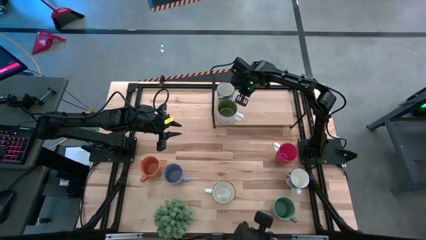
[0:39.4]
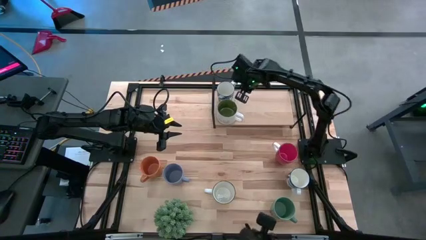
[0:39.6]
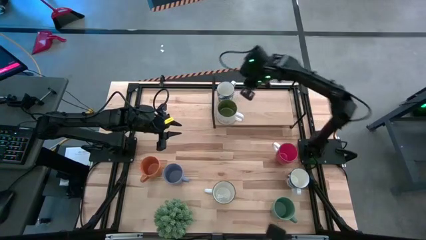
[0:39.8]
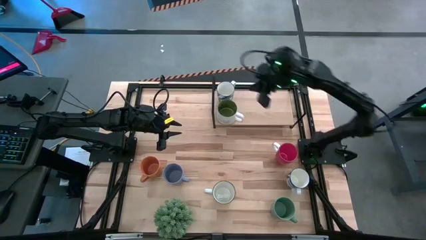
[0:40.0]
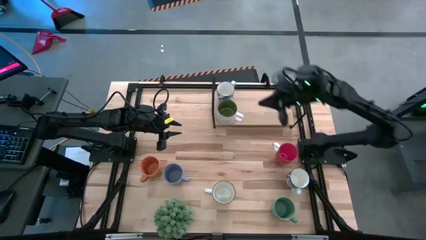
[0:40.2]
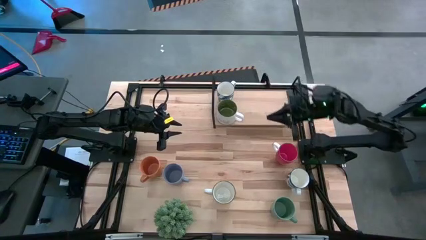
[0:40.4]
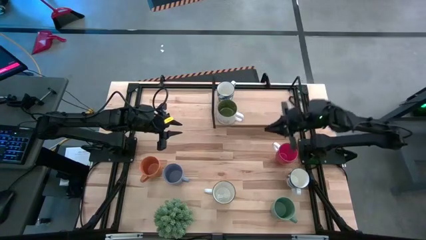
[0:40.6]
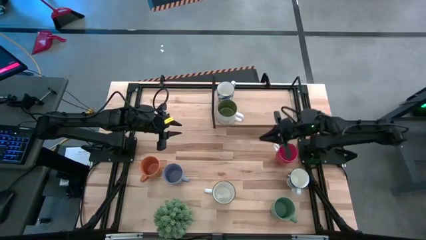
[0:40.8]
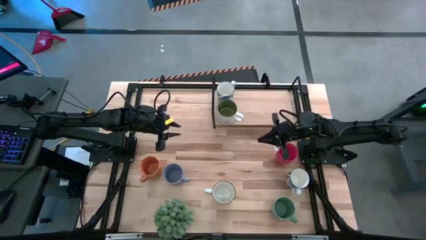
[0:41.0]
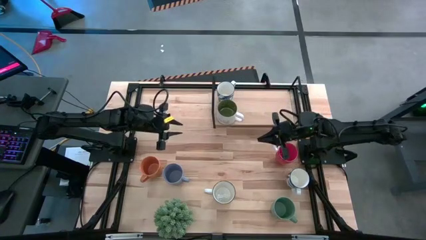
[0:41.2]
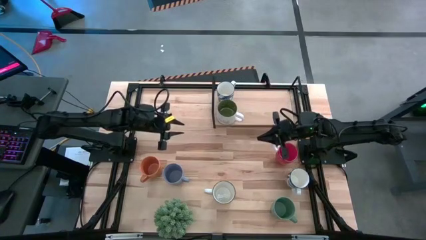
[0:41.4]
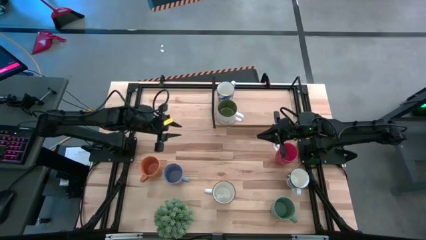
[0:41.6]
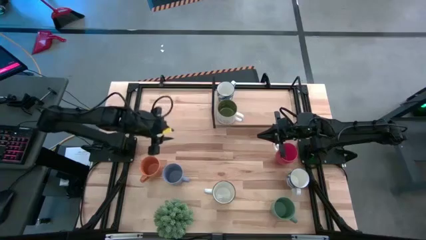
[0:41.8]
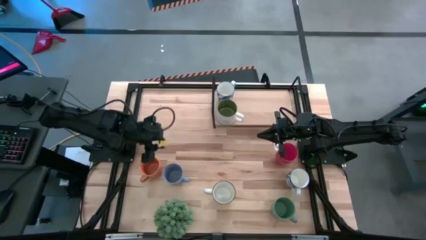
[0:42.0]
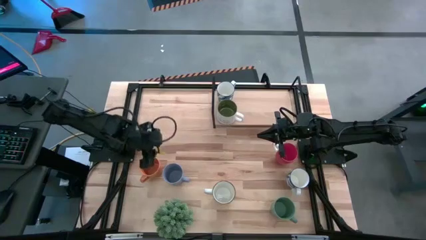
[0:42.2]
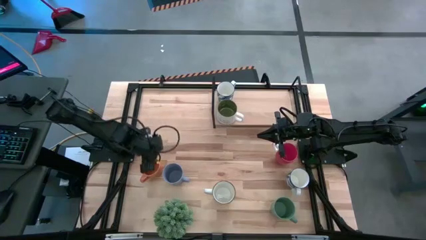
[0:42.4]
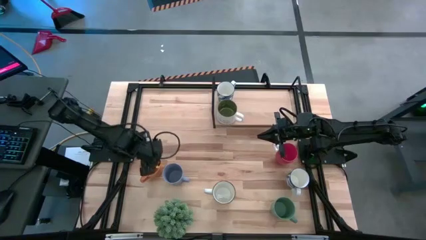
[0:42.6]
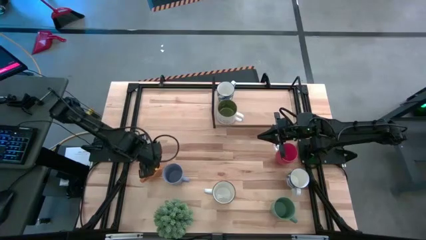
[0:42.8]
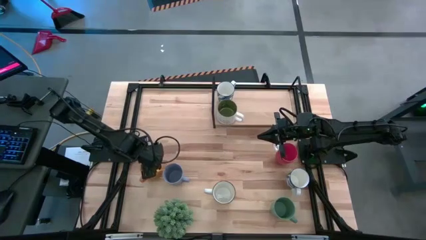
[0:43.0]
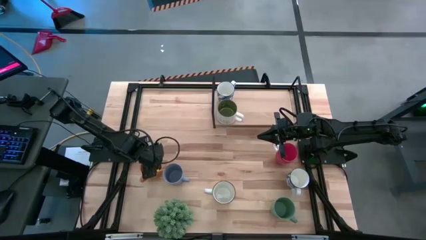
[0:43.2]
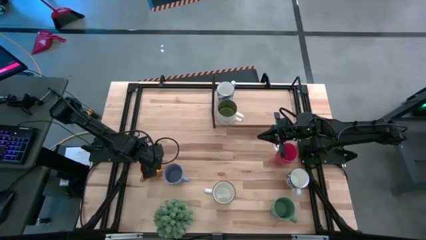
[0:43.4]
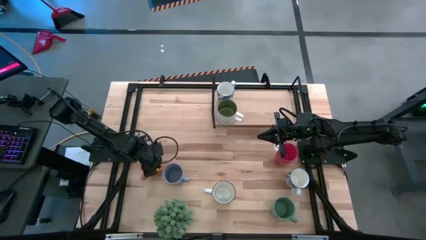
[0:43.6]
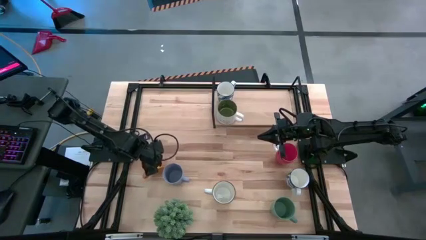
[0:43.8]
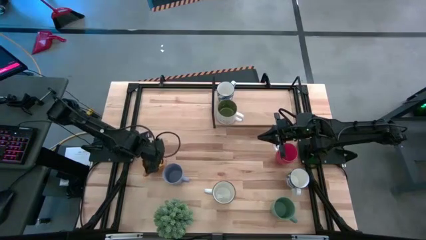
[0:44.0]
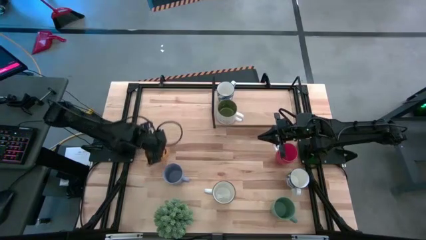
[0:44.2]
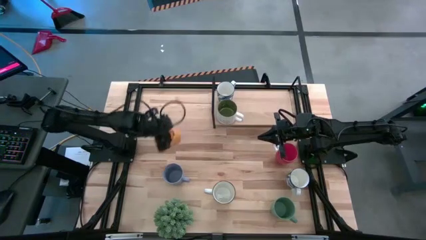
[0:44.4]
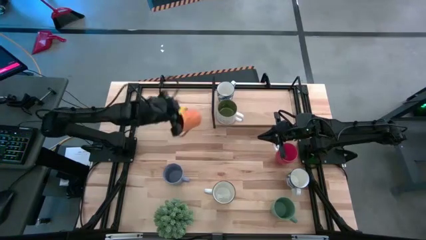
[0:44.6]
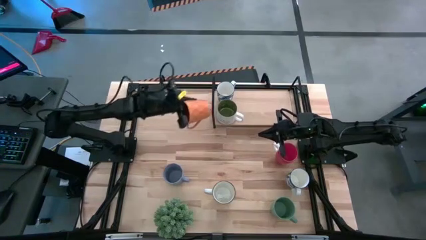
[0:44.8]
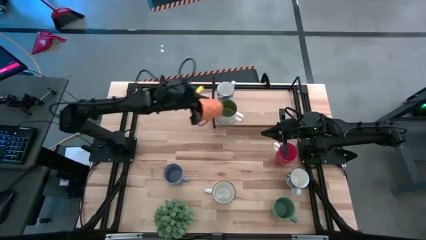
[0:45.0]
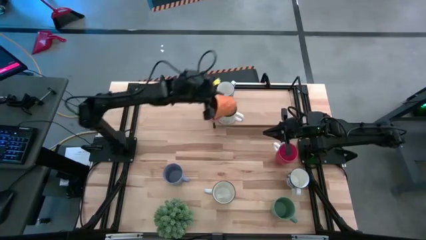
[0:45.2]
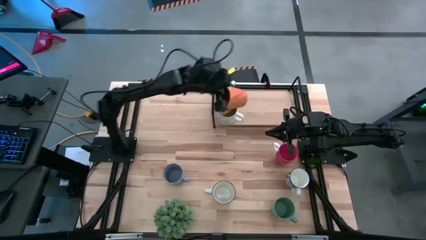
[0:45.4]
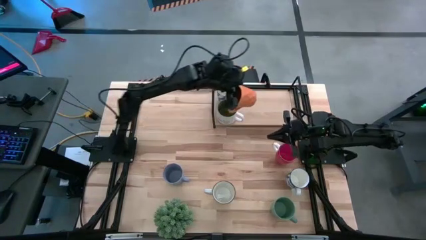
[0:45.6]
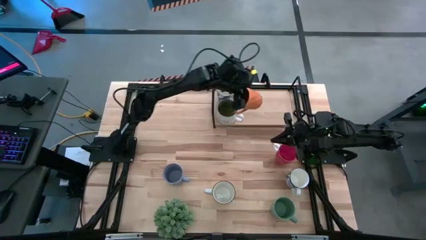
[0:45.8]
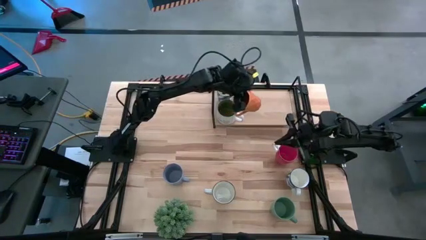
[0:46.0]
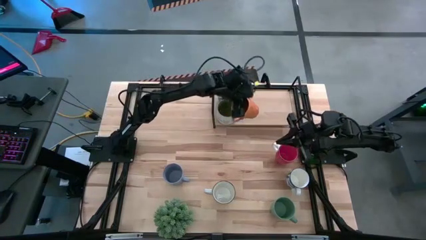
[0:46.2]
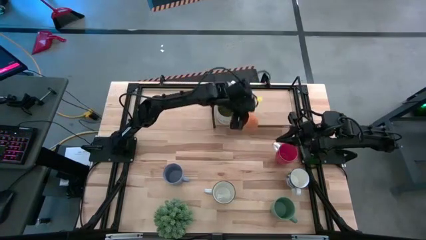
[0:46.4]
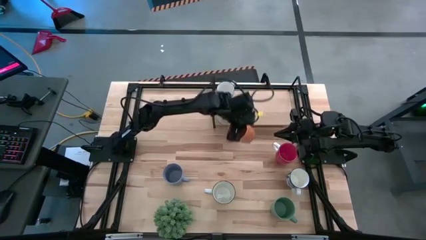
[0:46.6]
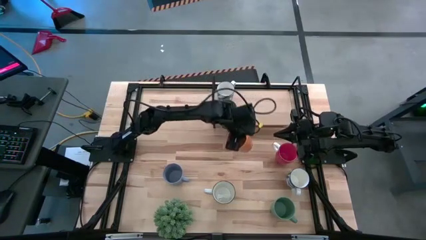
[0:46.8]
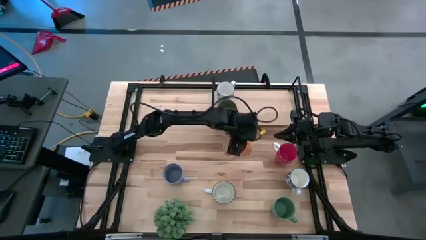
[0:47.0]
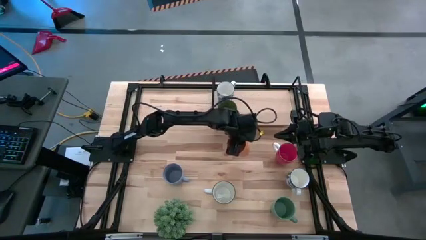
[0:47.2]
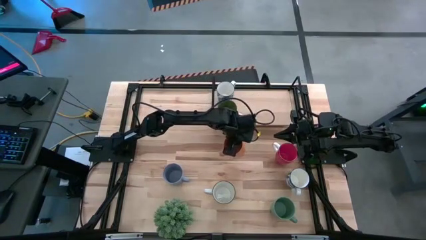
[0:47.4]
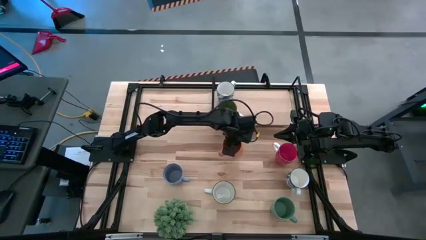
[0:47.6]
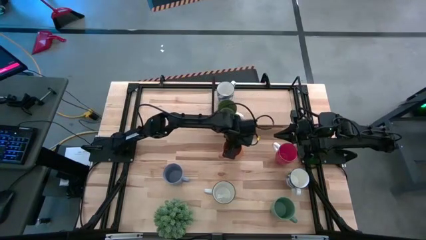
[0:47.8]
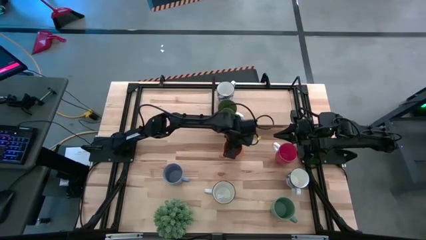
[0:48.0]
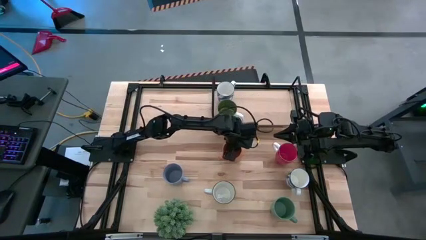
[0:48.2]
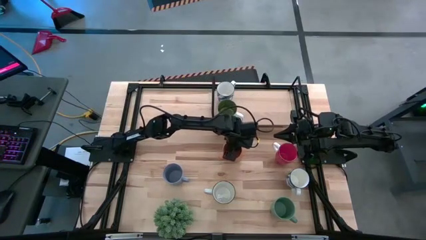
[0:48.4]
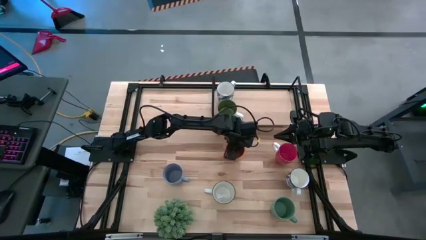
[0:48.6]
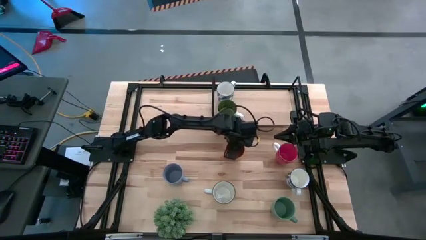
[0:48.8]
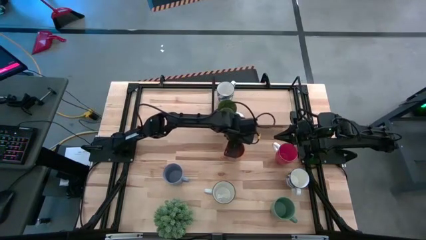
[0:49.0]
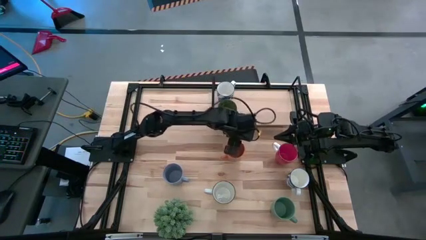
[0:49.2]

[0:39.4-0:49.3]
Task: Place coffee mugs
Put the orange mug on the shelf

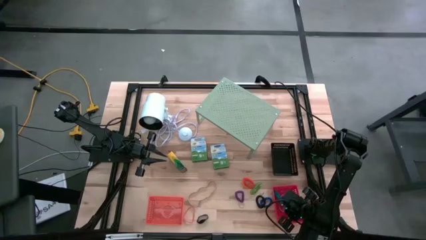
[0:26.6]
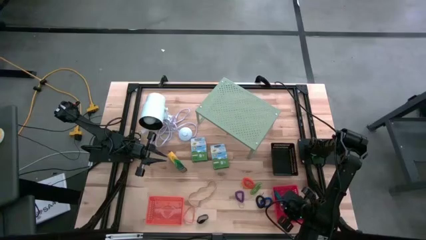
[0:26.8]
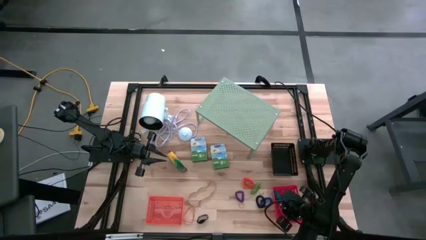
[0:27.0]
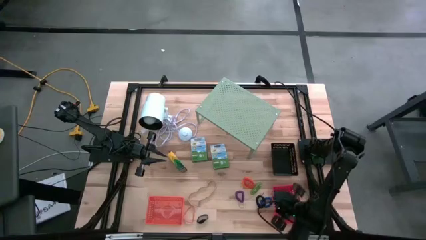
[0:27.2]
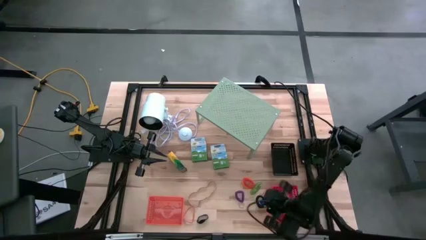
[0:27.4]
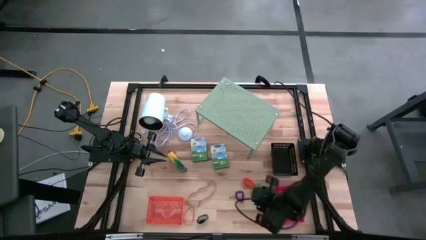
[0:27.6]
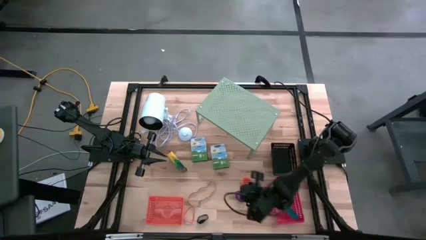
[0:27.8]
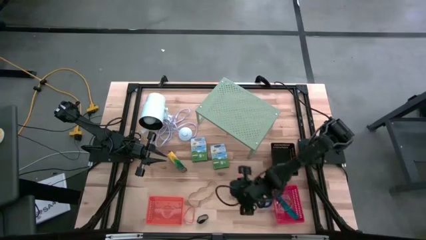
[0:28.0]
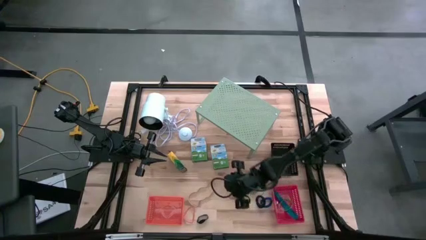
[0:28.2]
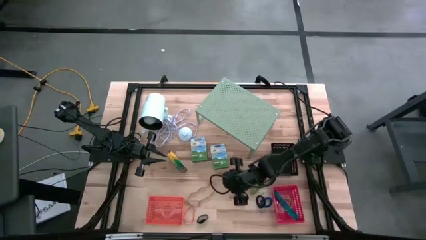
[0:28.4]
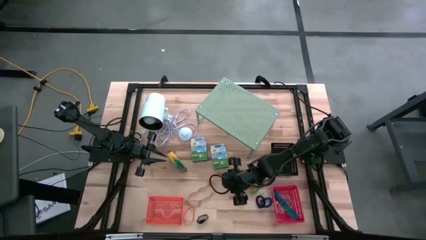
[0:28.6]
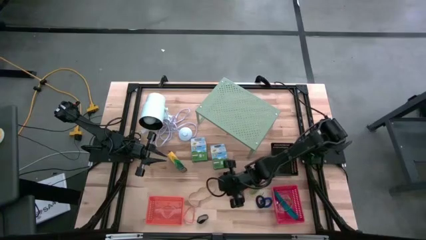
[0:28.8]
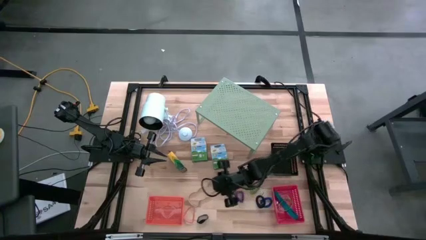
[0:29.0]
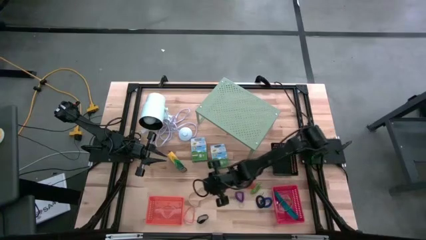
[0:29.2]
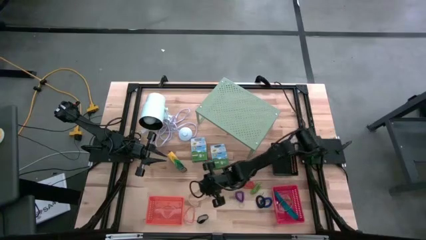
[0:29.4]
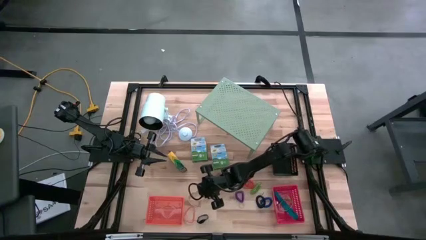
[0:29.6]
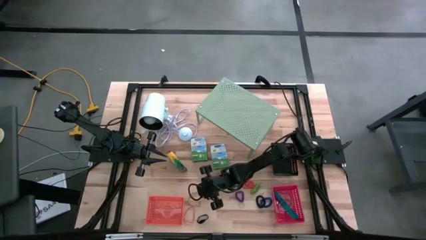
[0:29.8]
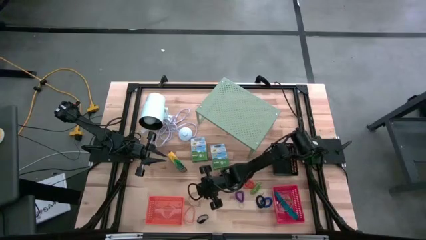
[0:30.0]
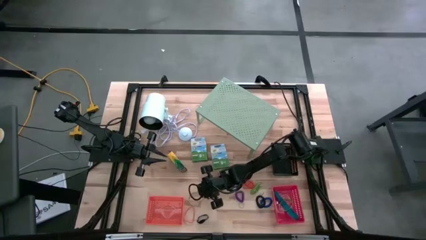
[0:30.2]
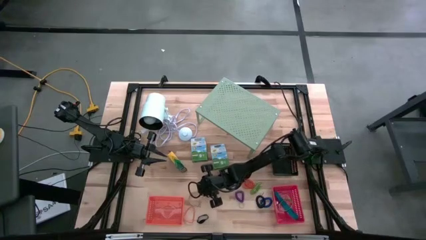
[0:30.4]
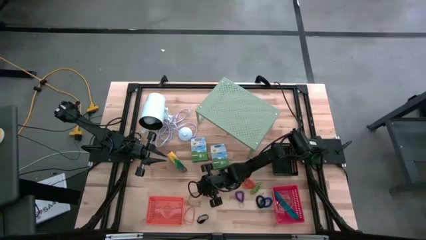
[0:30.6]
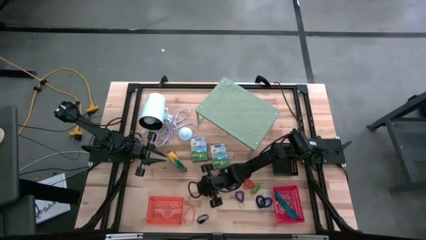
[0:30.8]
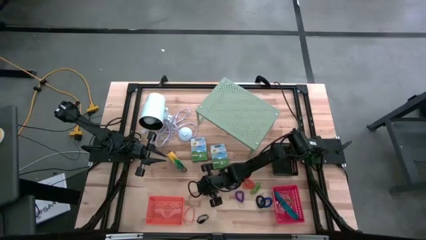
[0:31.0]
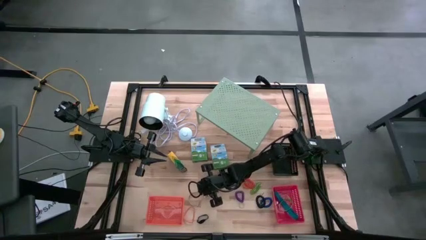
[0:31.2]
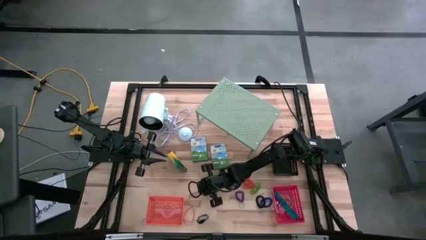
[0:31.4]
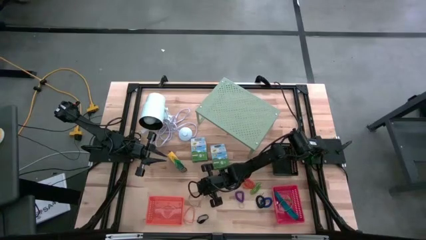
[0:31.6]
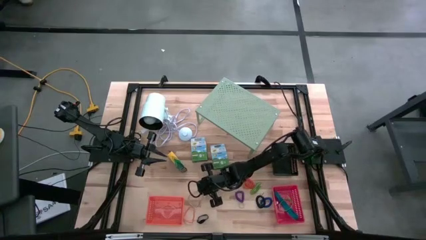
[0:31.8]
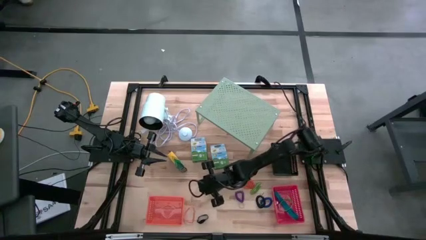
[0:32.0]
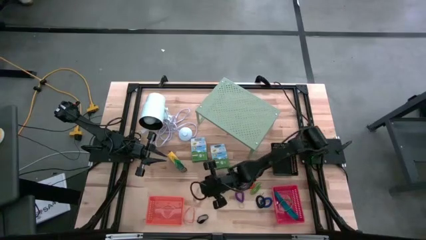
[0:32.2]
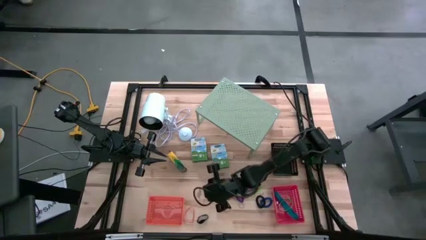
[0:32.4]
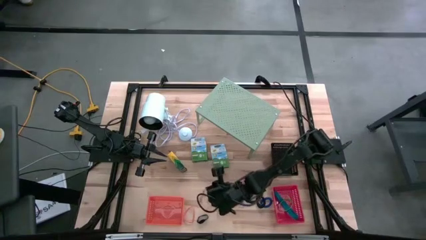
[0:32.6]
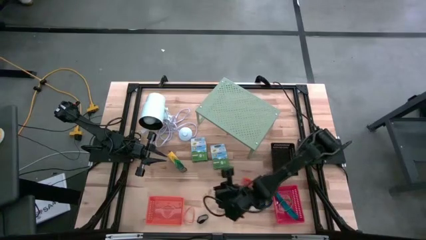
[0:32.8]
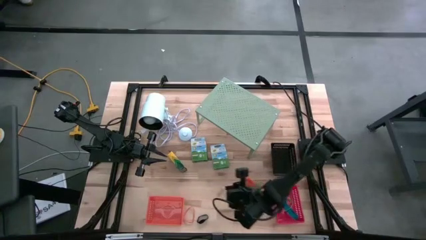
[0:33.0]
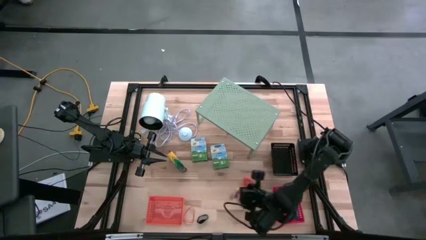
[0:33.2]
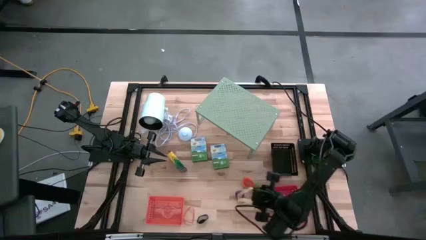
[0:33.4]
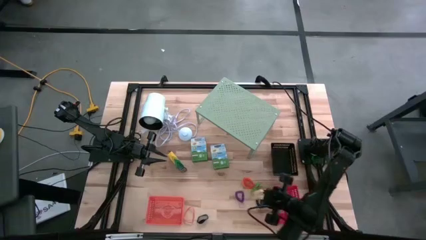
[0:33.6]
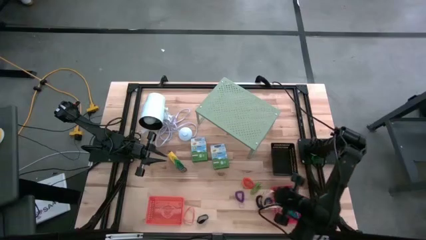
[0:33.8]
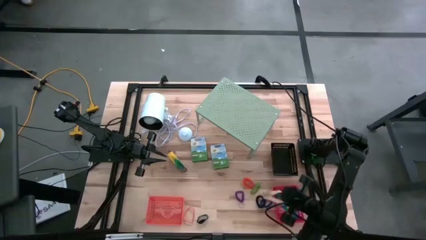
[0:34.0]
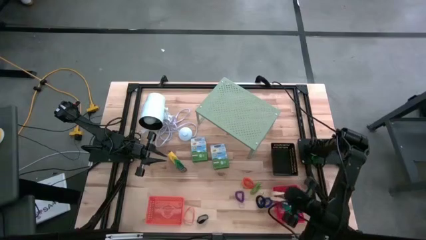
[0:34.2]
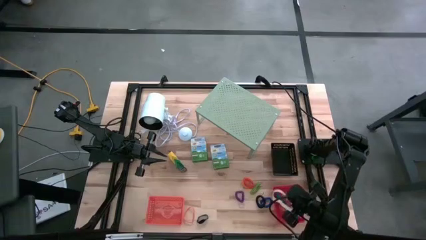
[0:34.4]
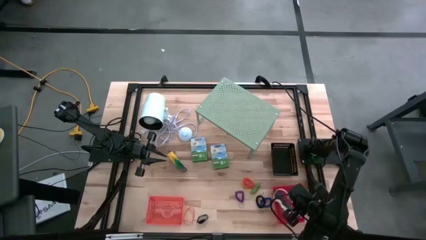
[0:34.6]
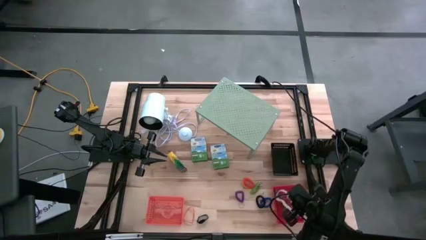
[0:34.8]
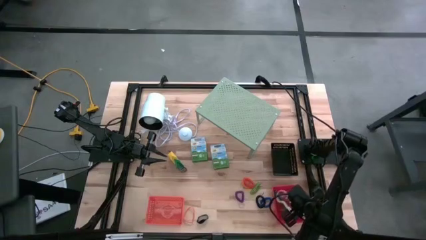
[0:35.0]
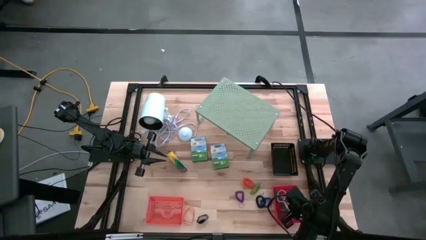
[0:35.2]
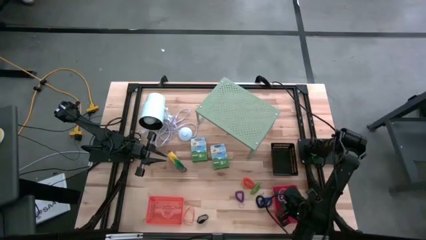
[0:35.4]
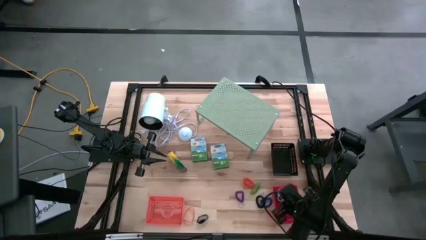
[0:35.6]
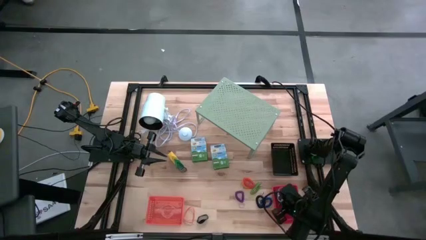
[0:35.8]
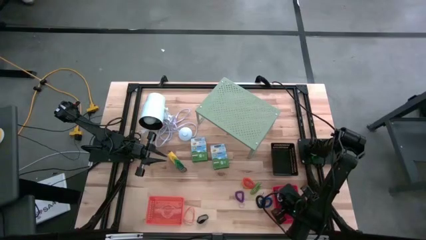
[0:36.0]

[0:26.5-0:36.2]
Task: Pick & Place Office Desk Supplies
Put the light brown rubber band into the red bin
